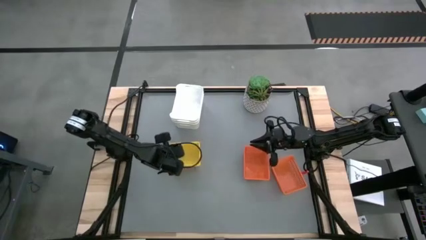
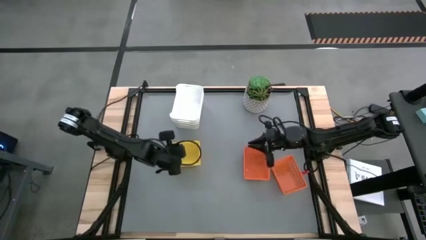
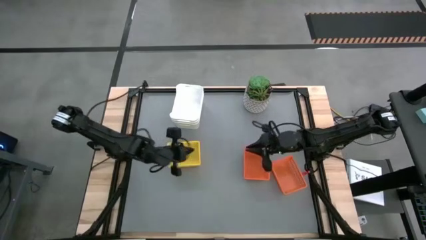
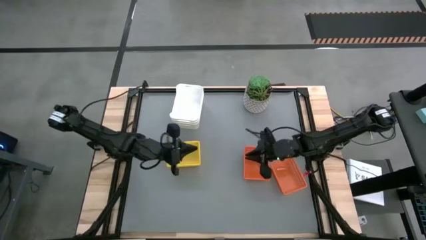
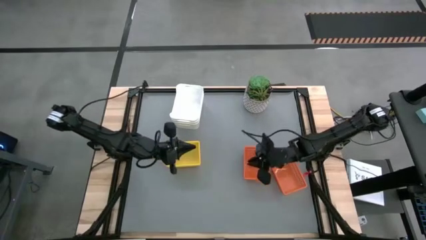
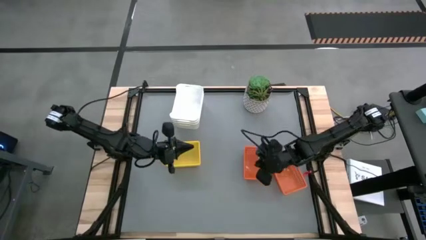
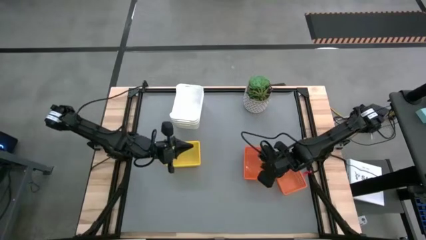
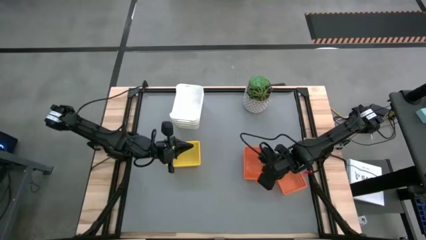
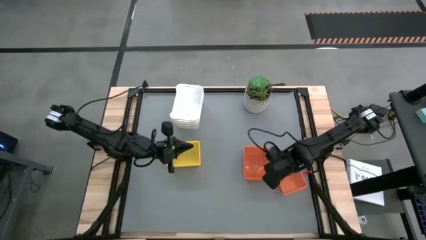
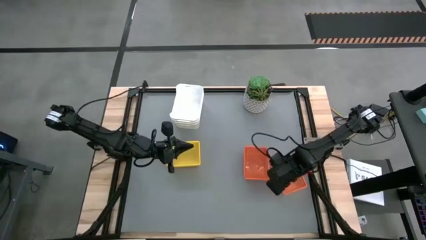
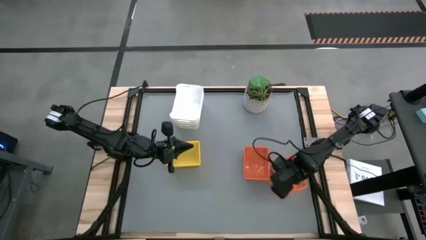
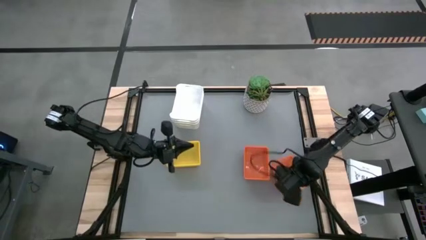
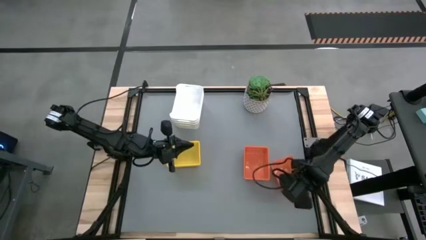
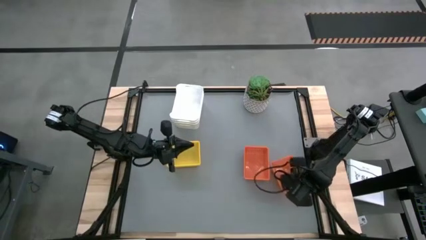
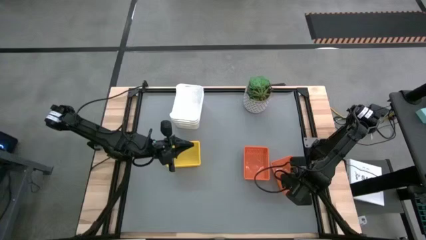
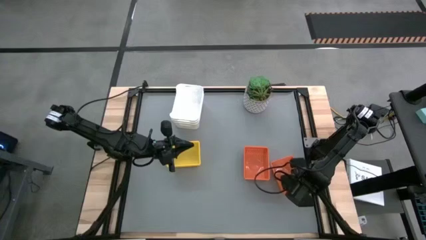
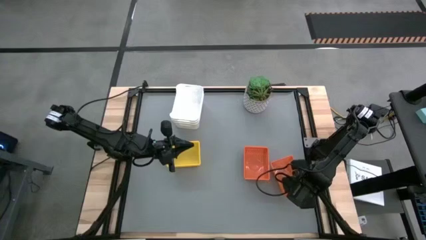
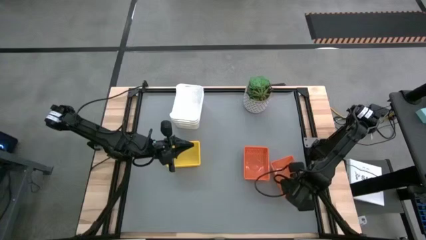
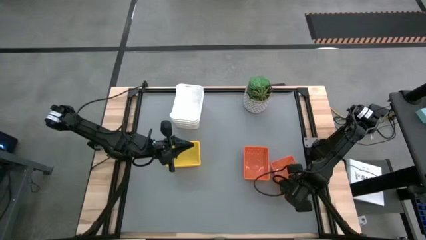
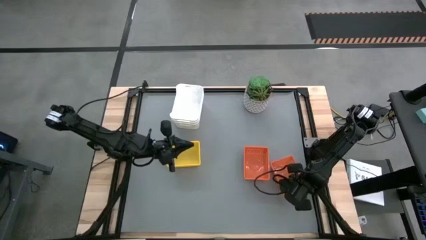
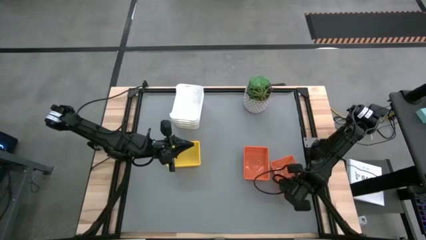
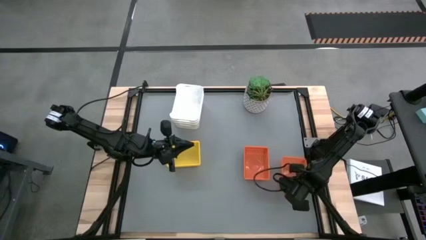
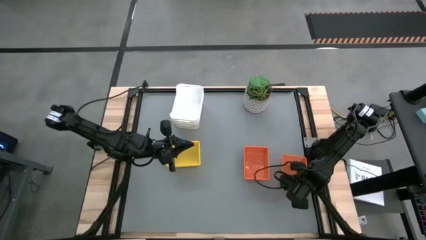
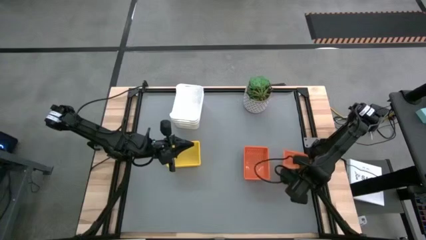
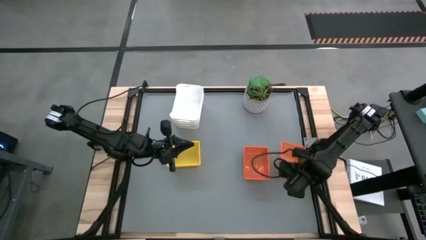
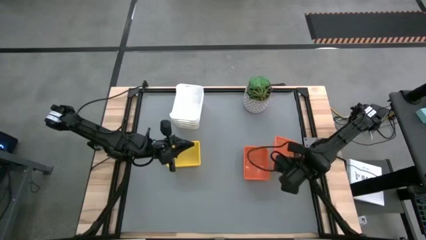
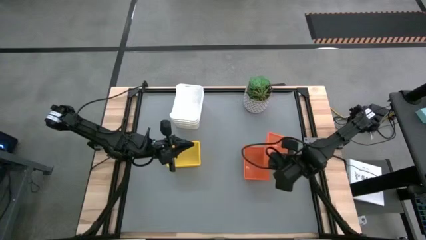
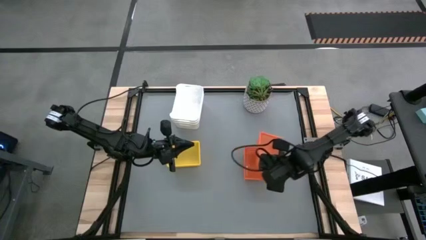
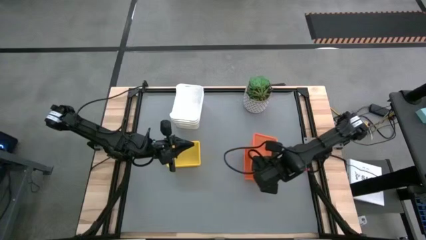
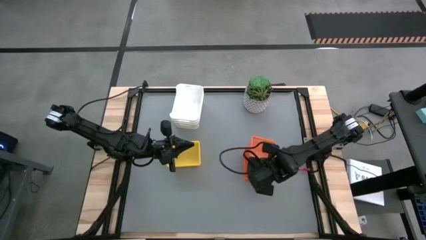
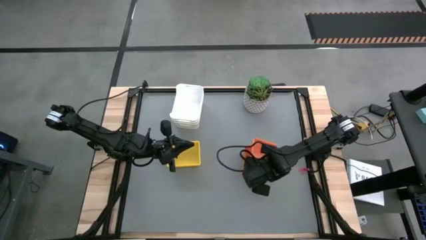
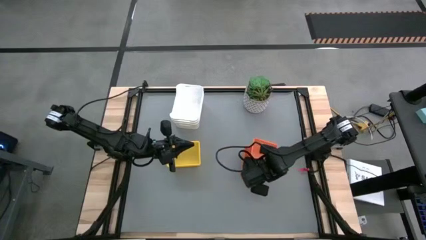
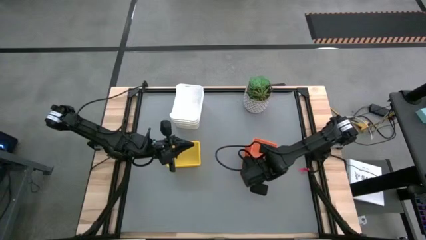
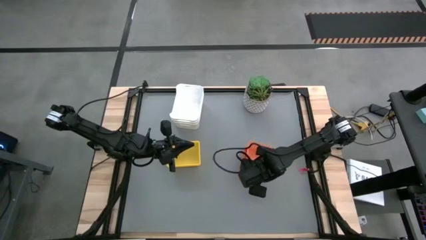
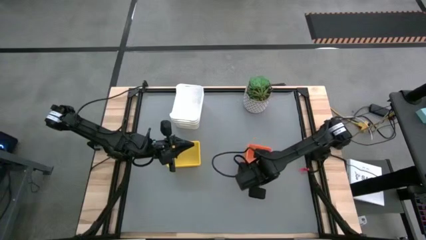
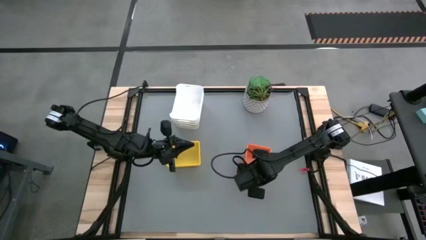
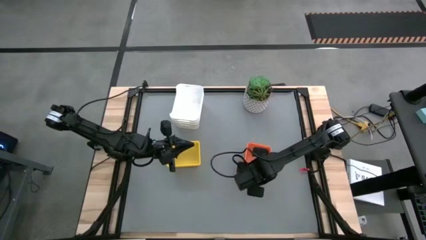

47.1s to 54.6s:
Stack the right orange bin on the orange bins

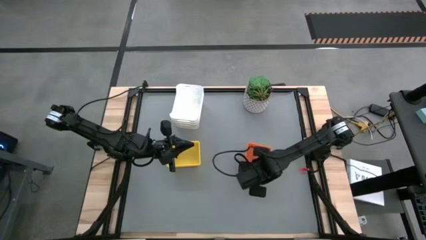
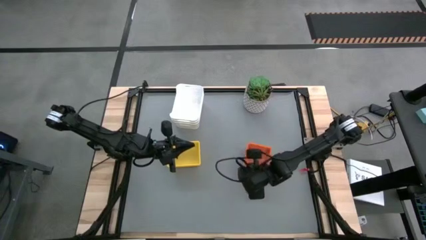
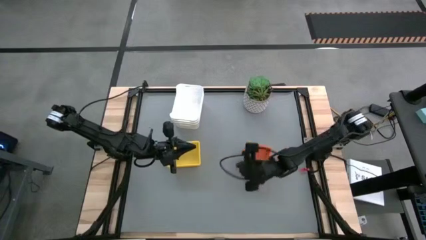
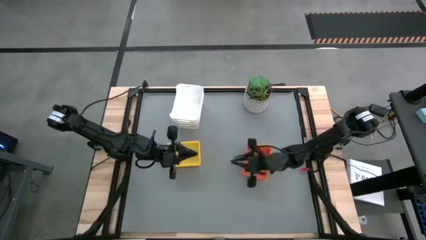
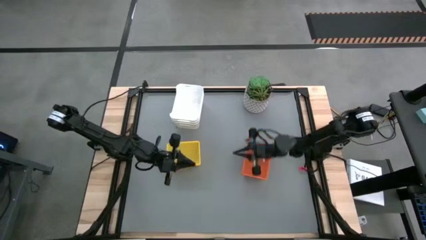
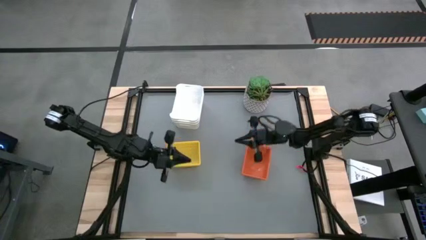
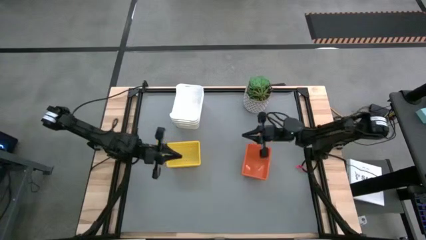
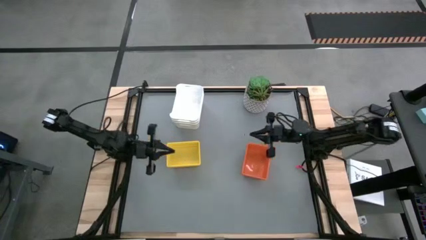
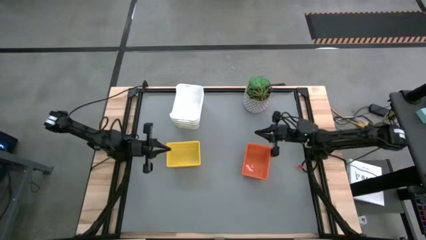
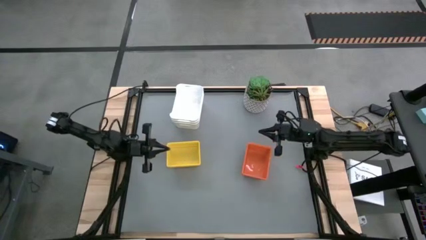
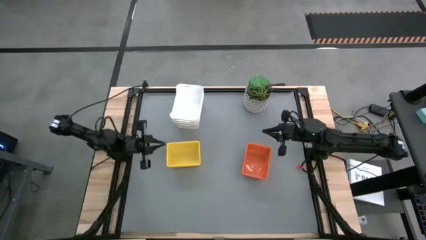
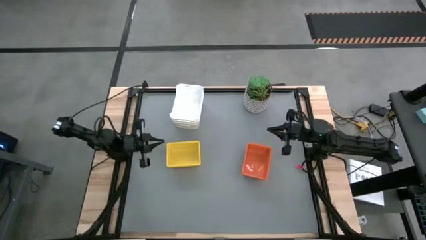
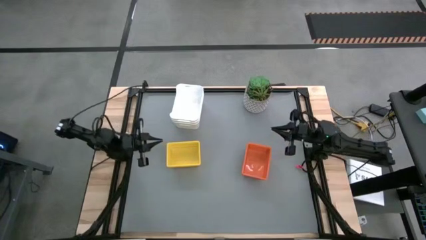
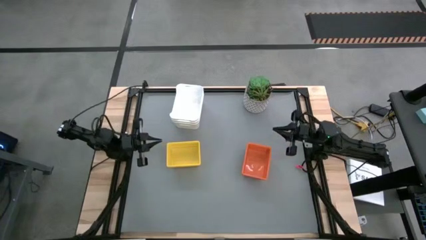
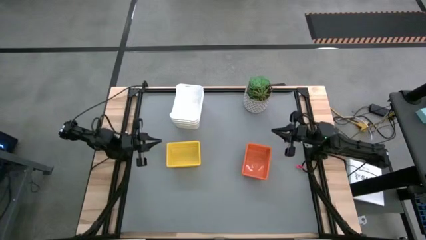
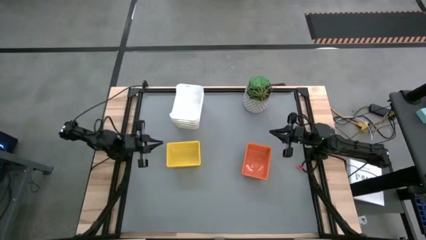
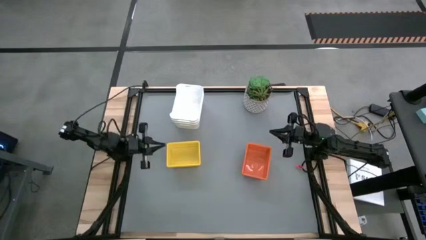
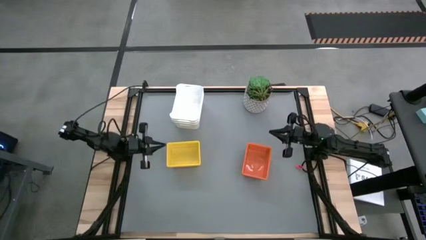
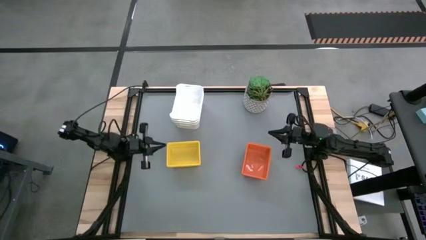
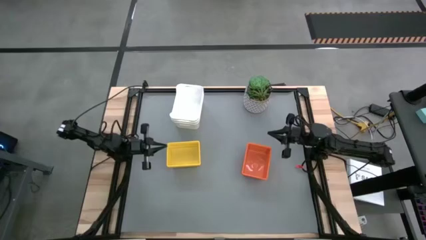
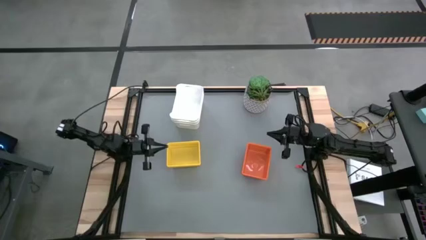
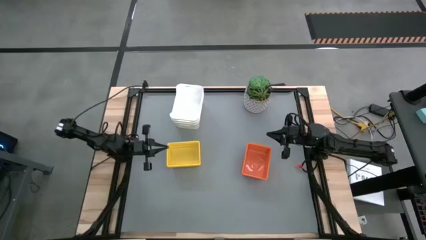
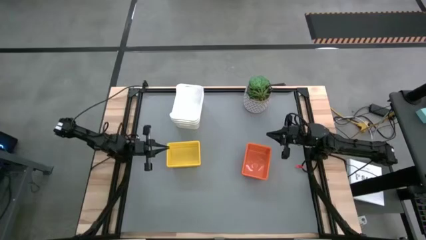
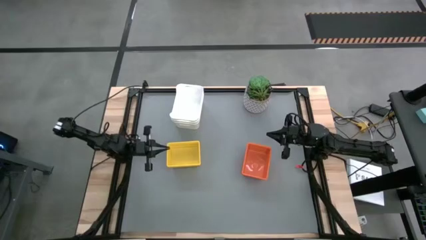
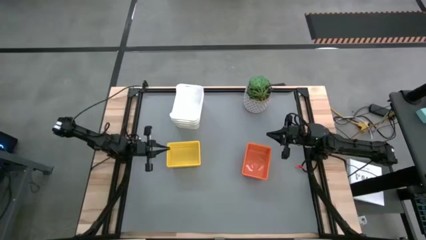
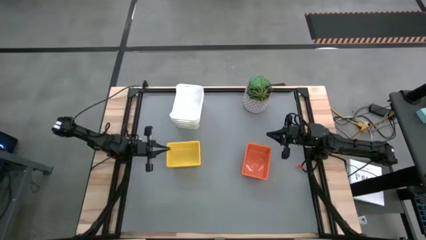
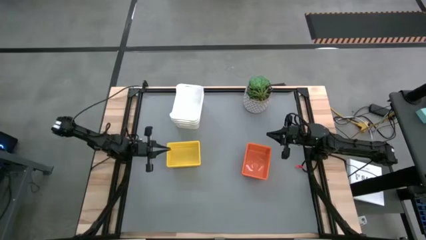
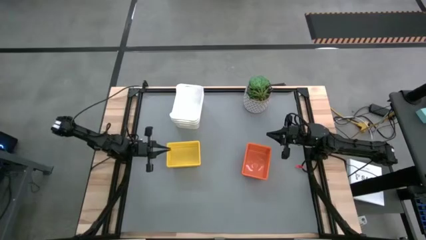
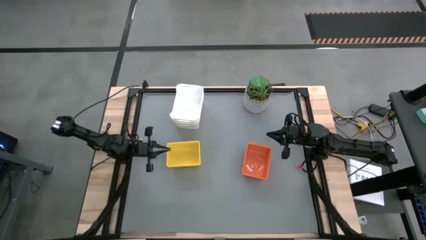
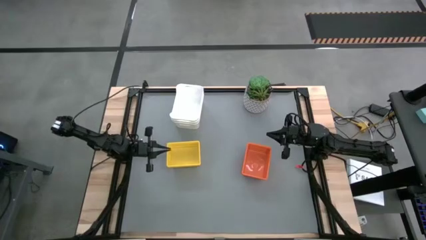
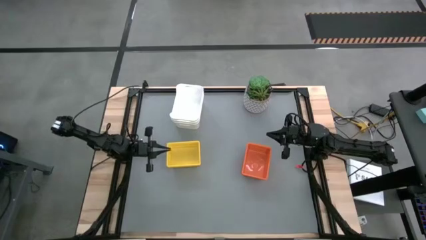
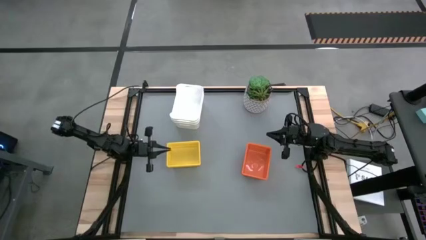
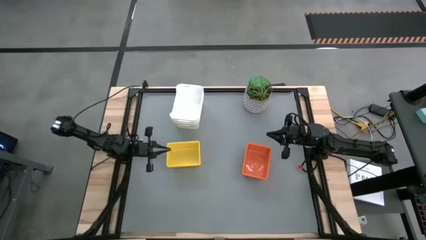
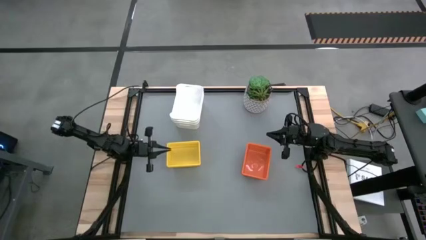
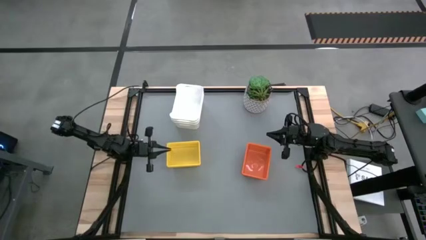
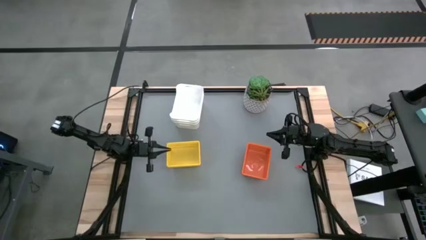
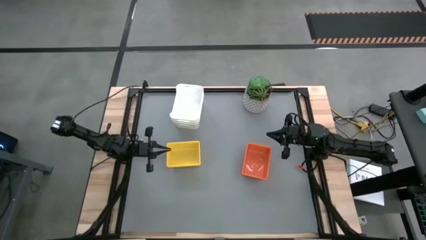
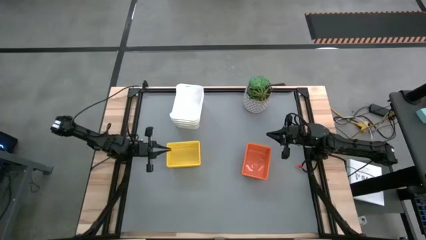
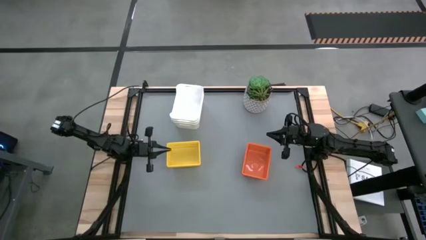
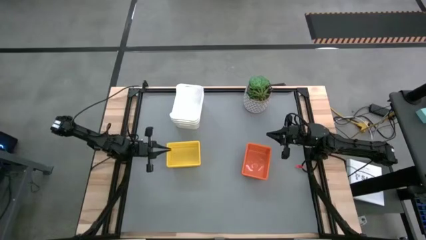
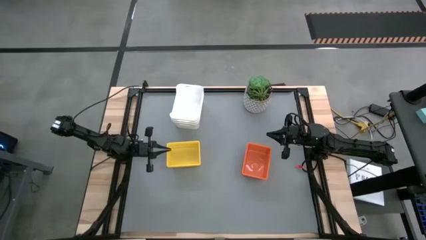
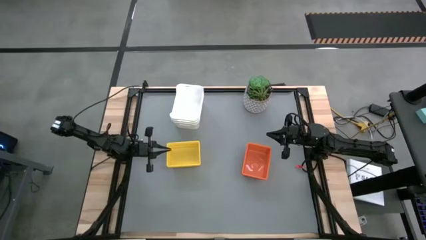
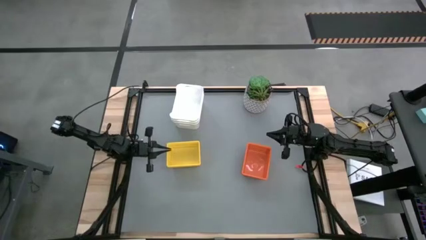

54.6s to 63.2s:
Return to Home Position
